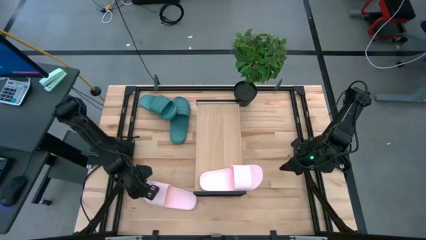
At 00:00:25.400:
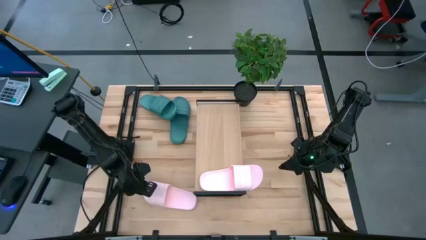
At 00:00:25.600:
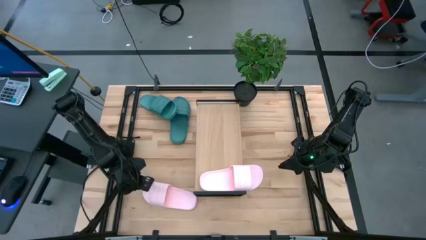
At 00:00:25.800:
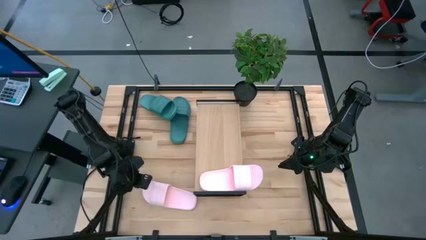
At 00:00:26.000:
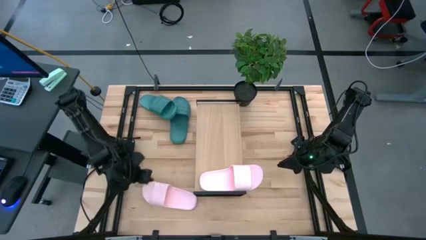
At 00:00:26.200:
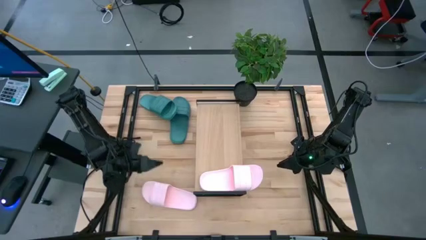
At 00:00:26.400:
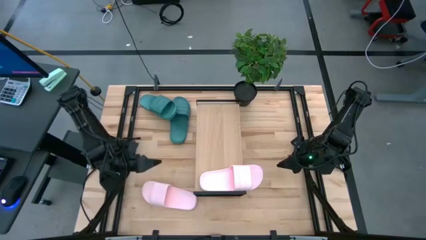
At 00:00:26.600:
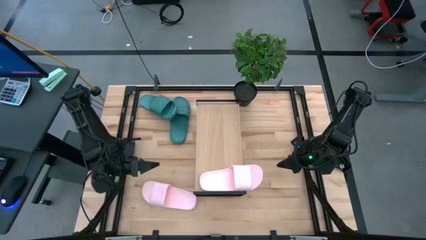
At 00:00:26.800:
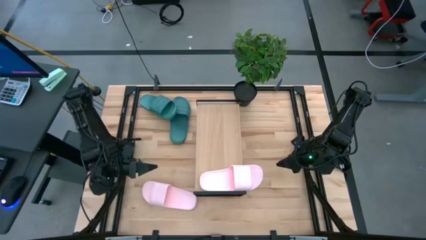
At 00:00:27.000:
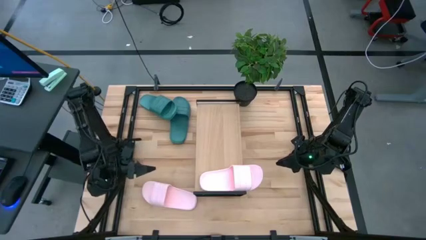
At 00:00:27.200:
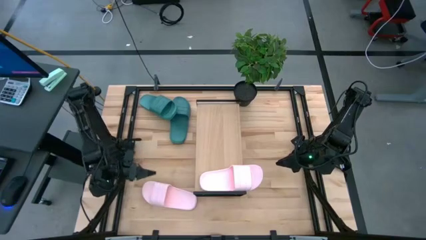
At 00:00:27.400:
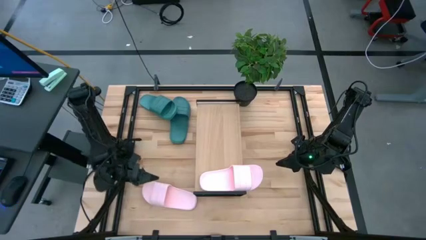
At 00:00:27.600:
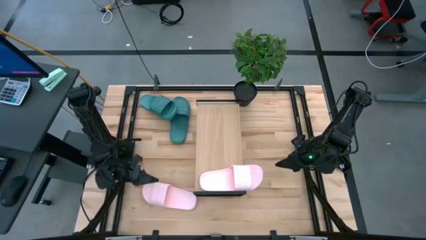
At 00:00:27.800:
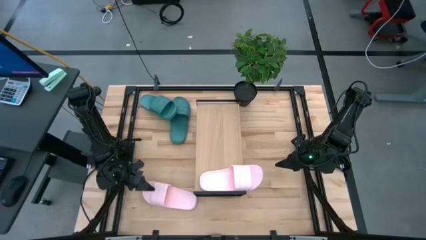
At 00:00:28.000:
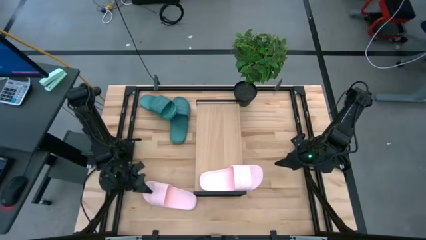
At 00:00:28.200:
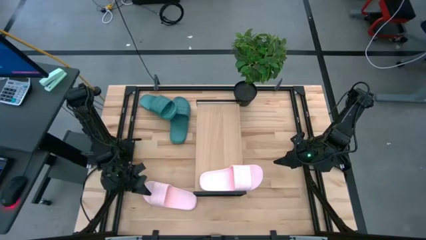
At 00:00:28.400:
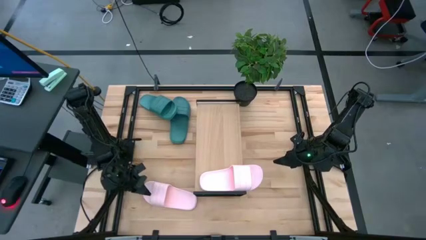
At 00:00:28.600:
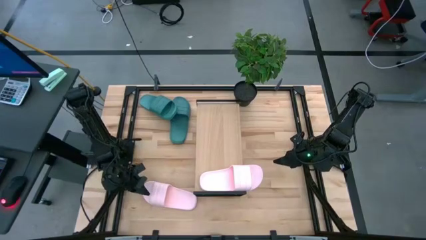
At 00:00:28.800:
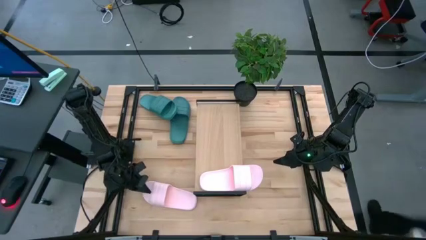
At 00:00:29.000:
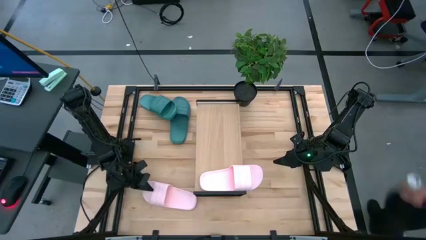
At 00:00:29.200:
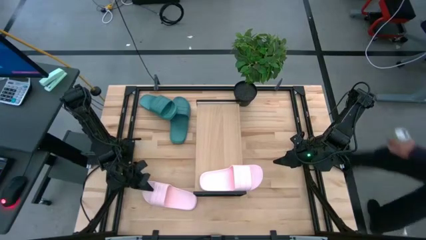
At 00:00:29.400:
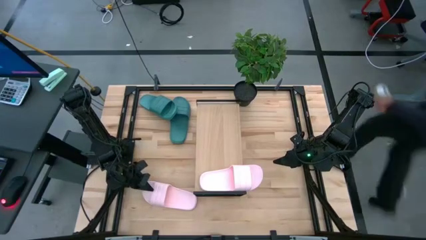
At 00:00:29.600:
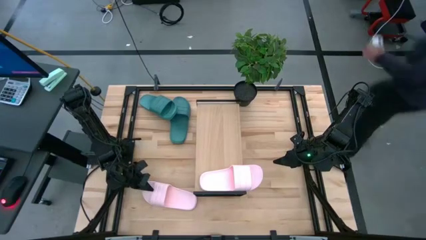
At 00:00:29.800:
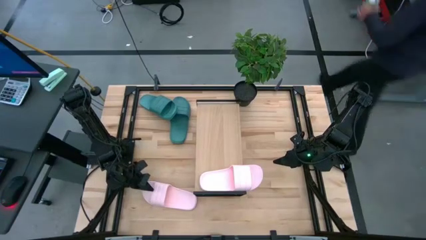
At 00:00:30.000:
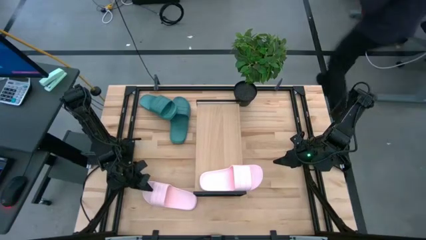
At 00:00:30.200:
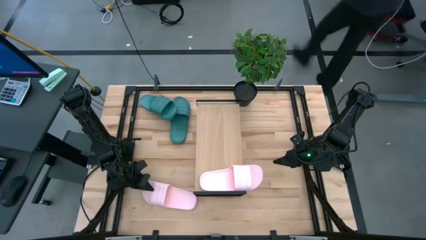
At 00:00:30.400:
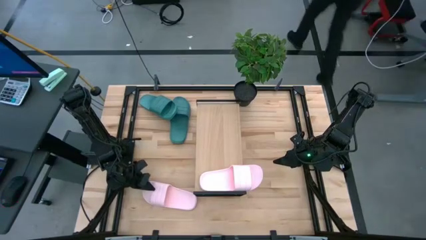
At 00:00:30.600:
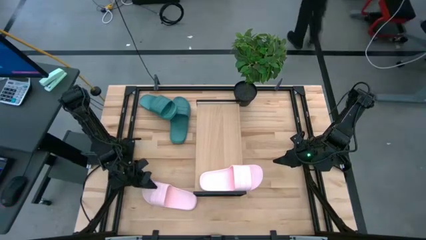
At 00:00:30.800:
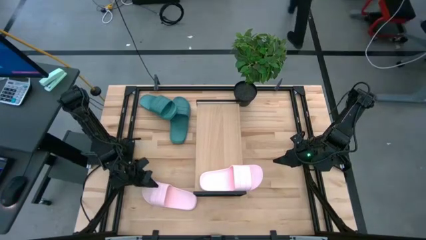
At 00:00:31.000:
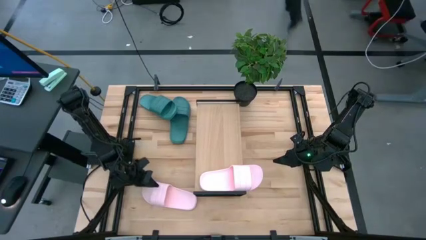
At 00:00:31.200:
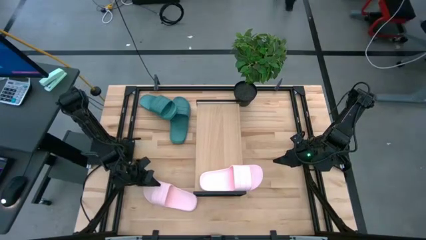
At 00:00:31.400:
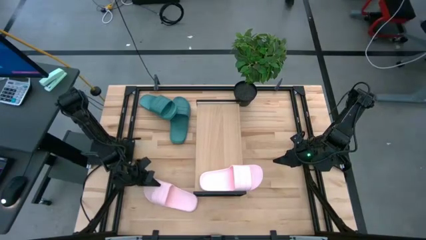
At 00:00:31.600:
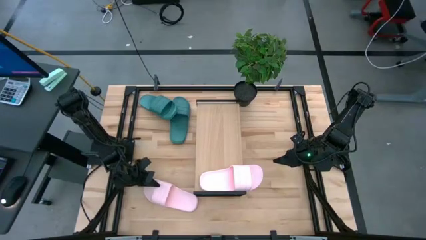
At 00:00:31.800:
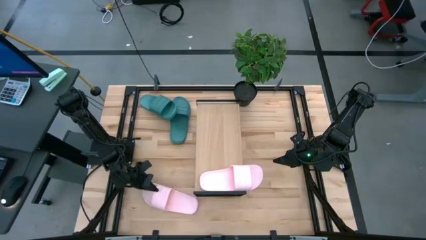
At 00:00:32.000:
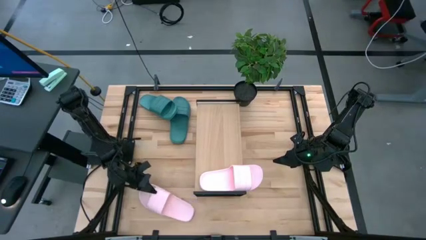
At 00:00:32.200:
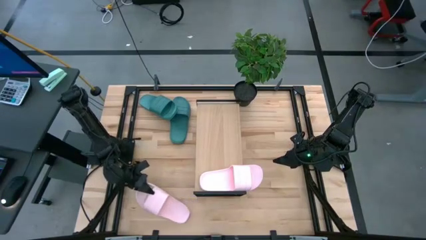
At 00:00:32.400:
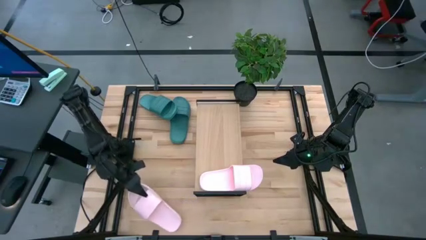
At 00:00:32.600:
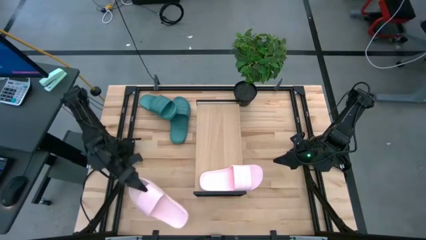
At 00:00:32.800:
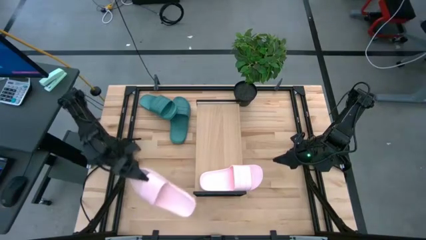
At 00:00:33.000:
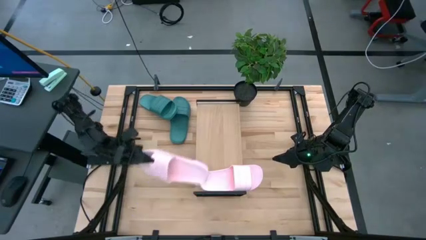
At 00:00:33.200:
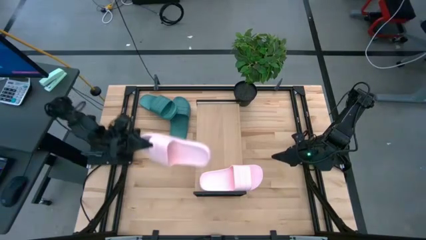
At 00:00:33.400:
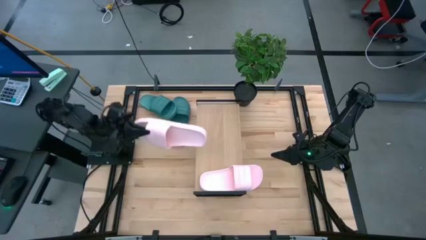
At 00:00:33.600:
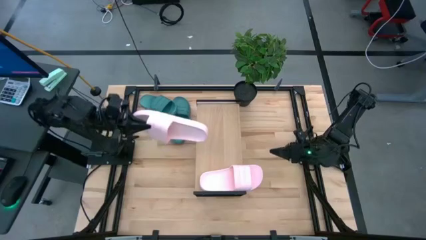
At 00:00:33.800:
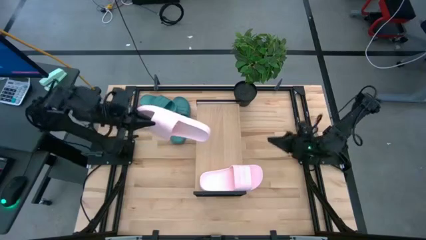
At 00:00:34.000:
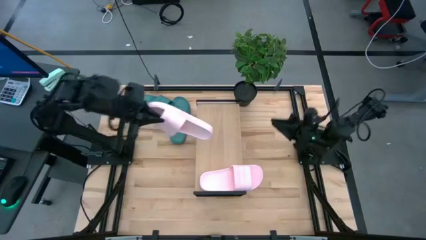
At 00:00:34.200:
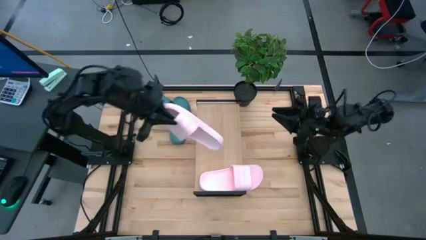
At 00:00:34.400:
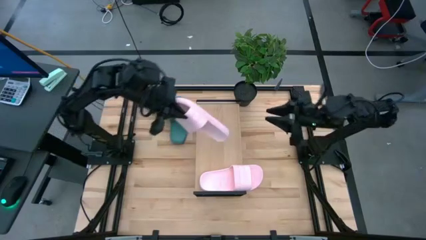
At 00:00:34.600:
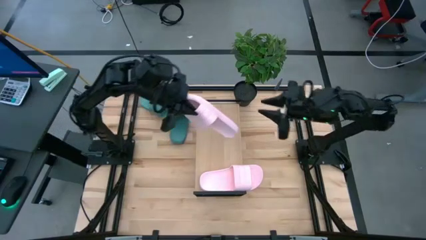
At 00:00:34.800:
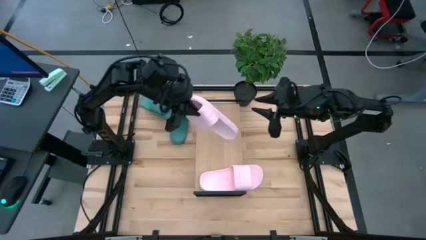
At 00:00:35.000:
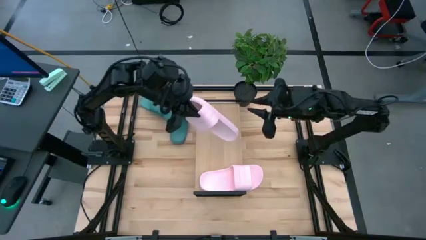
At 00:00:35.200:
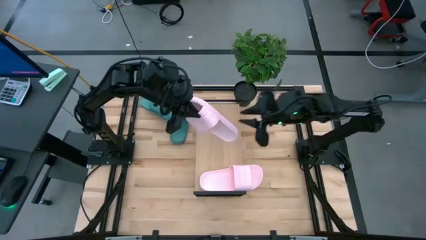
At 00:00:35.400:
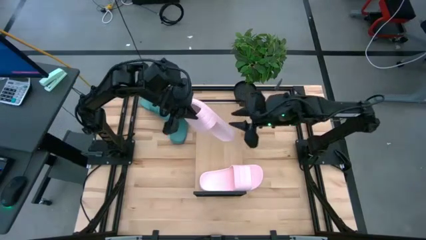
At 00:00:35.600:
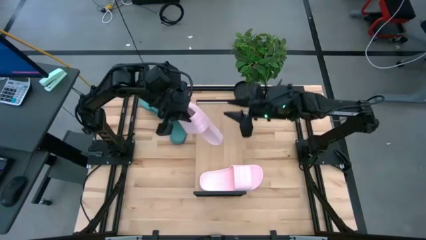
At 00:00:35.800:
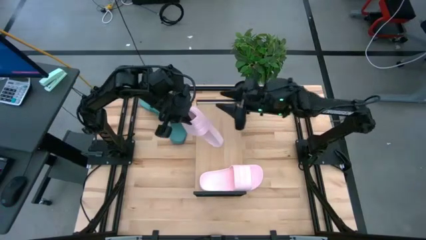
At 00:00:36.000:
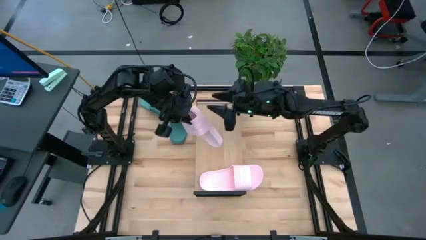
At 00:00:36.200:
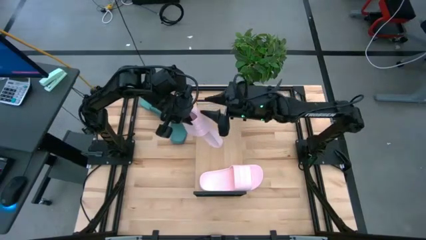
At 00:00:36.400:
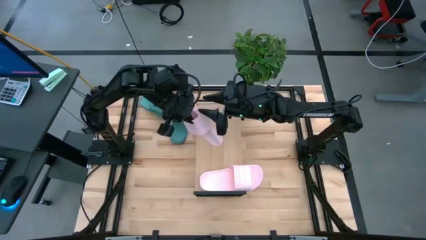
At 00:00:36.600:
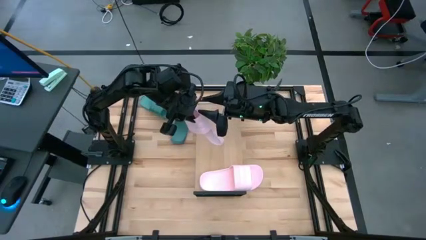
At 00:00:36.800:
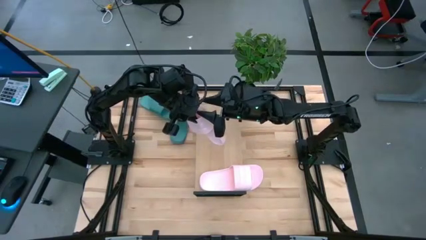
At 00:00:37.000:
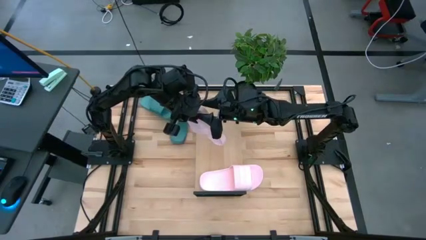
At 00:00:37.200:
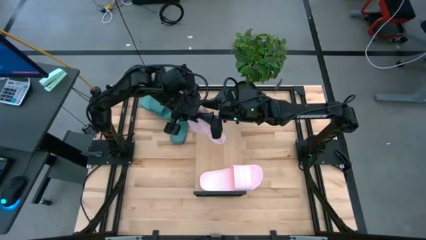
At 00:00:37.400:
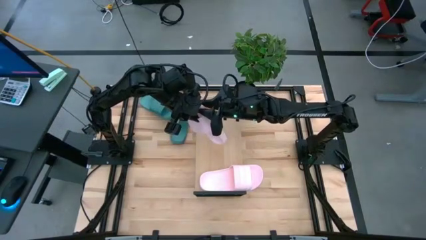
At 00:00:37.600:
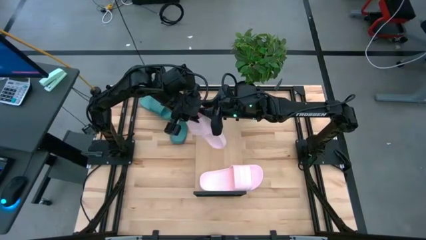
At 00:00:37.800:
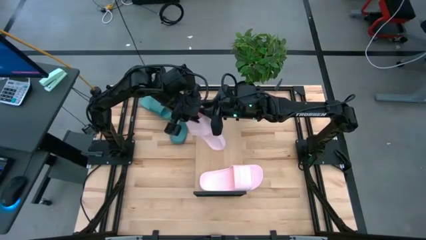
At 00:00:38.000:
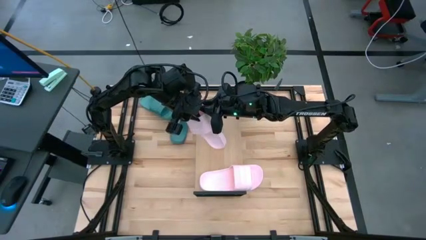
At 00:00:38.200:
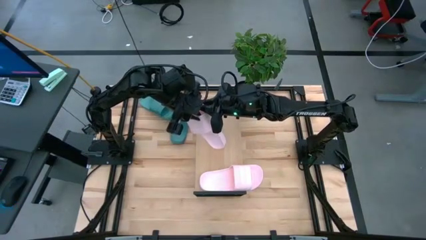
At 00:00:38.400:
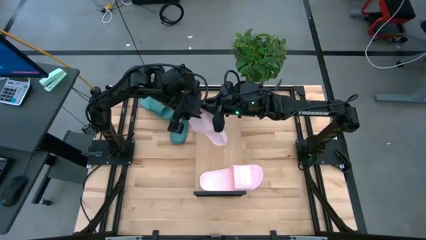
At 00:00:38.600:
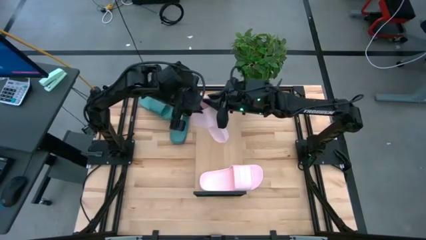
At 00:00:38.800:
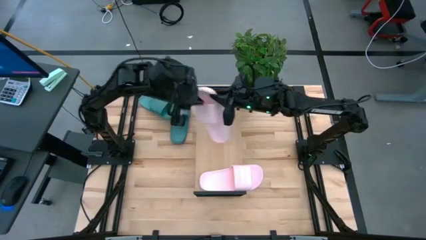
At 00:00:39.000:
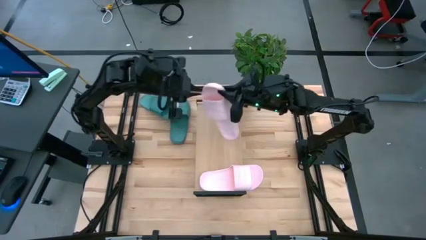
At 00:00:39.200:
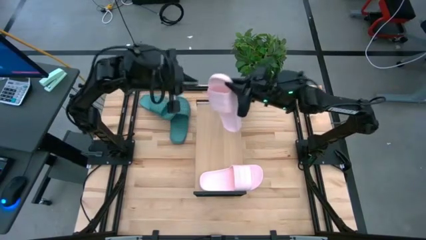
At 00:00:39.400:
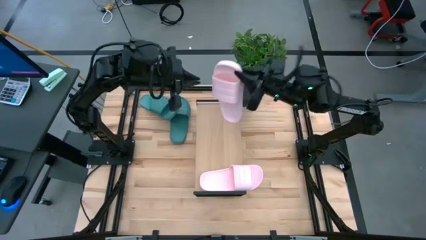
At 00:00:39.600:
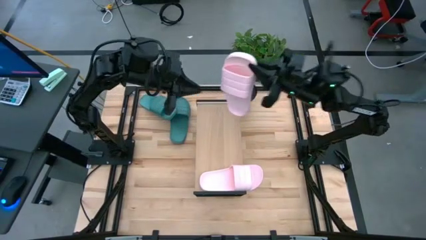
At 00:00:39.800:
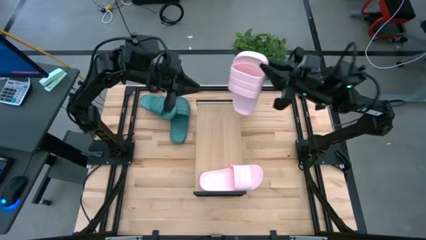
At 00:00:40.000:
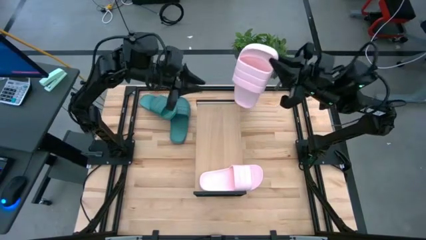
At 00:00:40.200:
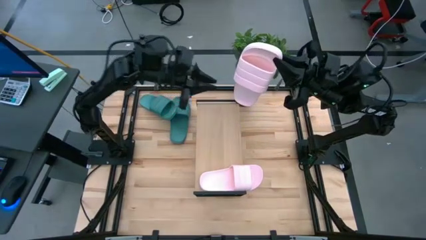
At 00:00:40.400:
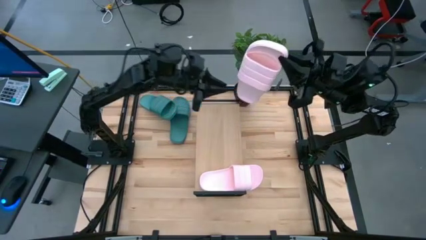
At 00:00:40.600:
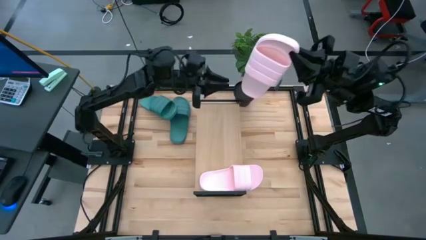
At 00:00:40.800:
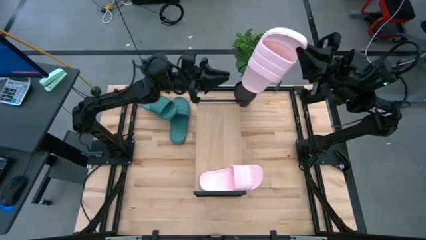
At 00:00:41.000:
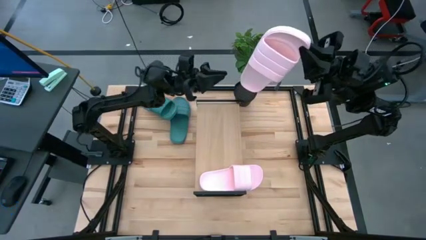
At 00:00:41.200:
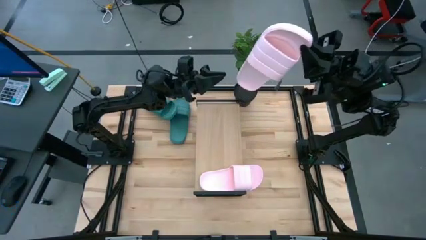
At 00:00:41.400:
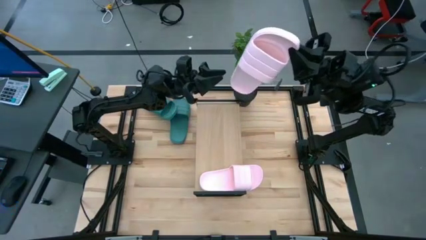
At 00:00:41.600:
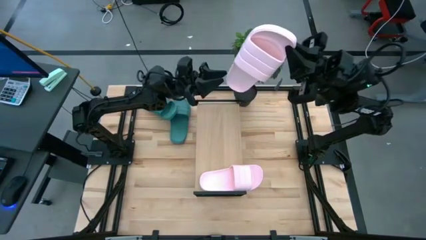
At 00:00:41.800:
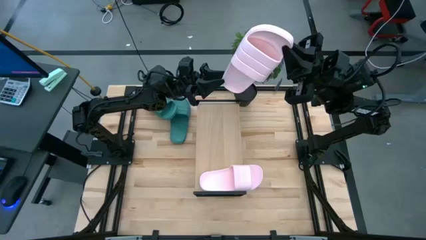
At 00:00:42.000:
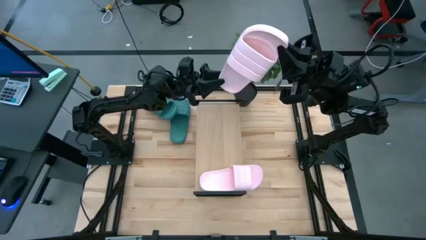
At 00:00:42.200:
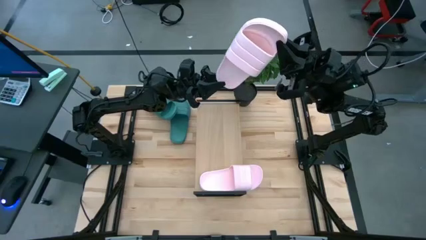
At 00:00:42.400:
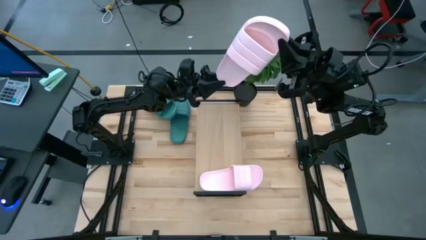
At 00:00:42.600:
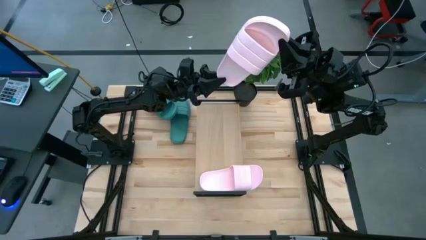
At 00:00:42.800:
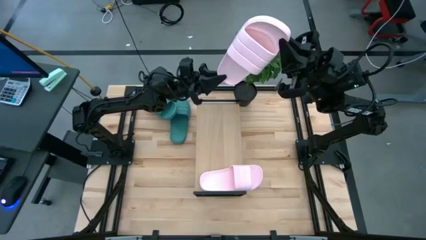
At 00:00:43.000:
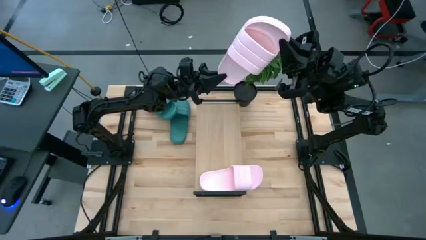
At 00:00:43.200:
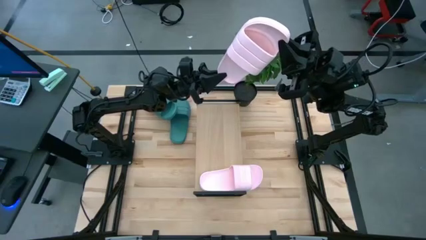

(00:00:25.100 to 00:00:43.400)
Task: Pick and place slides into the shelf
Put the pink slide on the shelf
